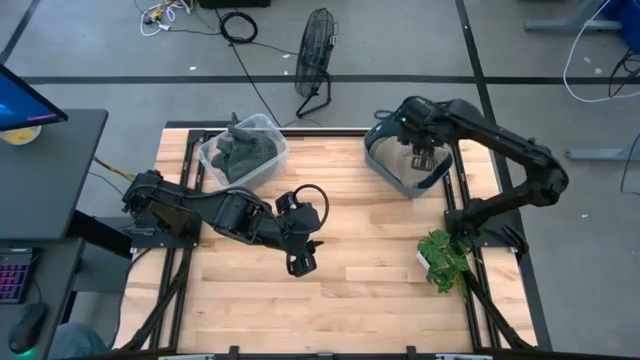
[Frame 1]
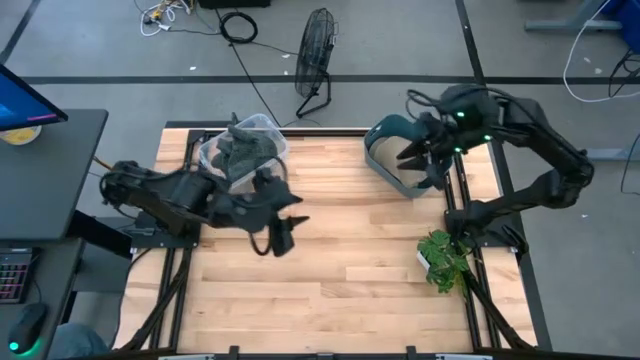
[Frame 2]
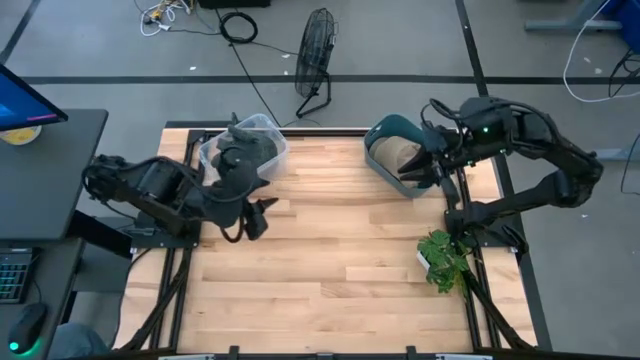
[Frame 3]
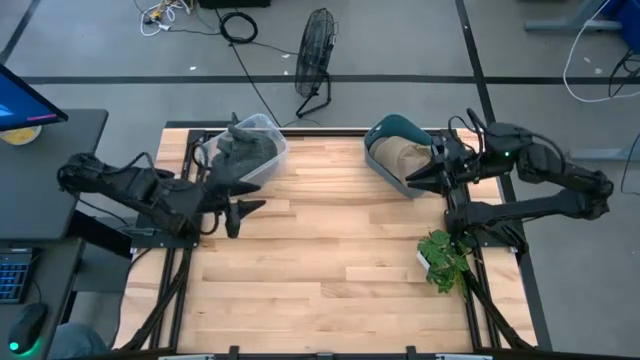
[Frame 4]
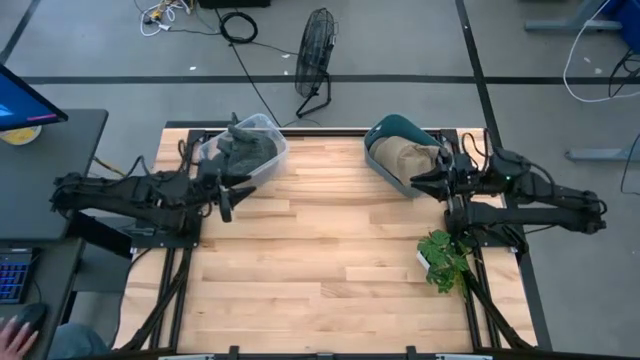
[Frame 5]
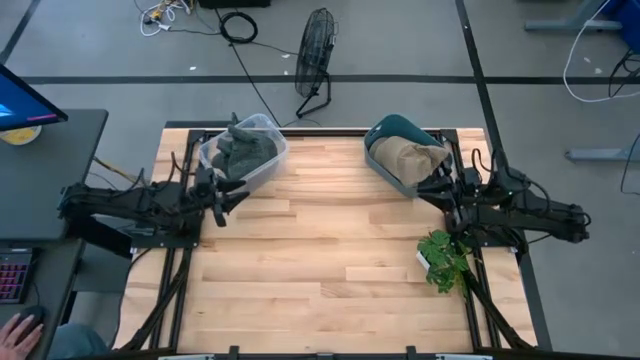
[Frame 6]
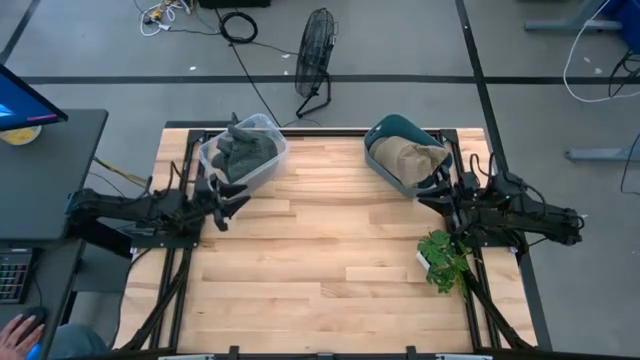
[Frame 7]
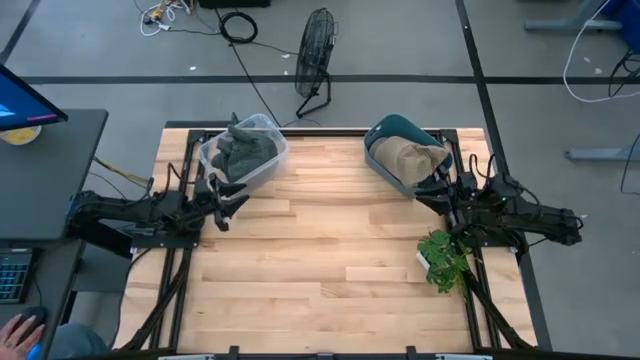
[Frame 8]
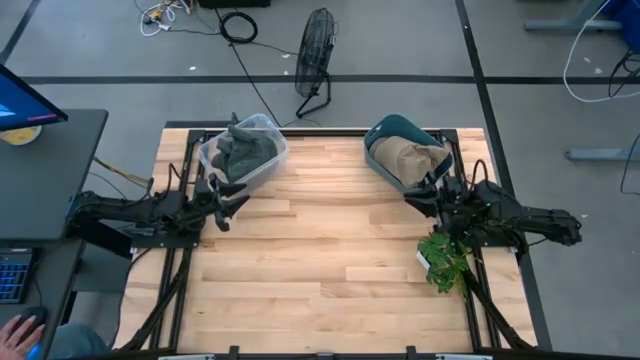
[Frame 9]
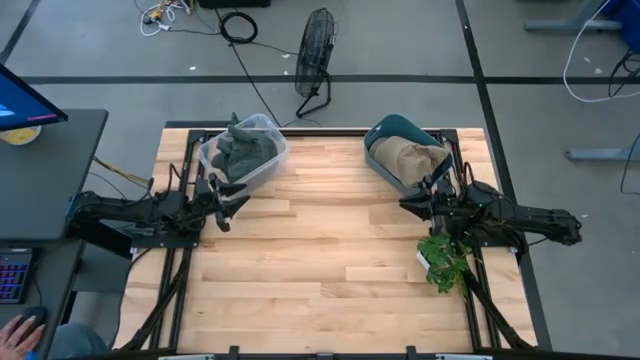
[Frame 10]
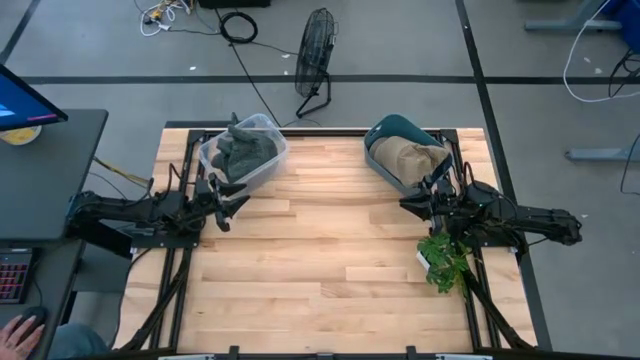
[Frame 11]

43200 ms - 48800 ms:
Task: Pick & Place hat
Return to Home Position

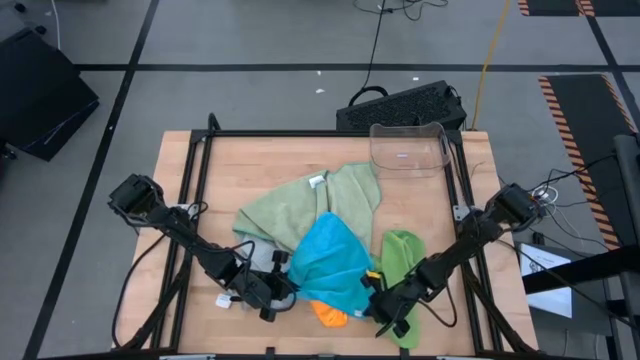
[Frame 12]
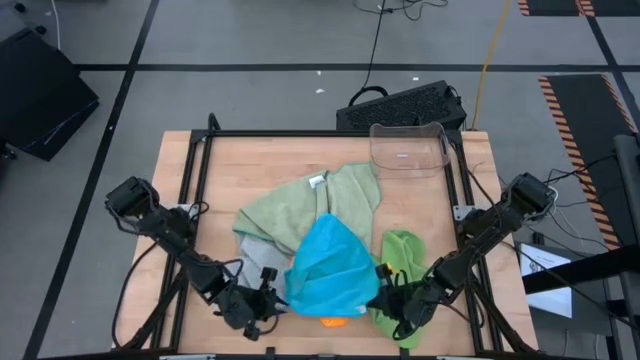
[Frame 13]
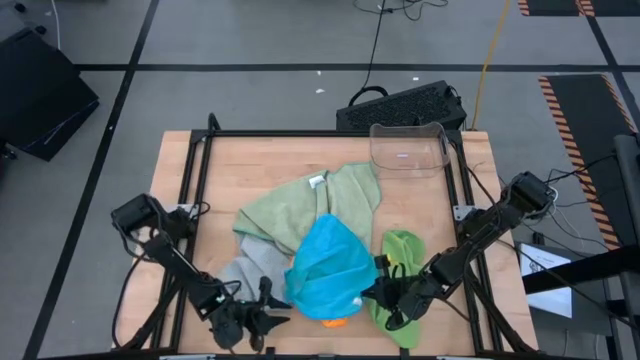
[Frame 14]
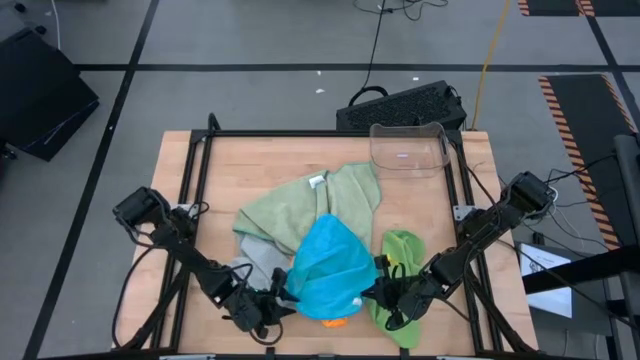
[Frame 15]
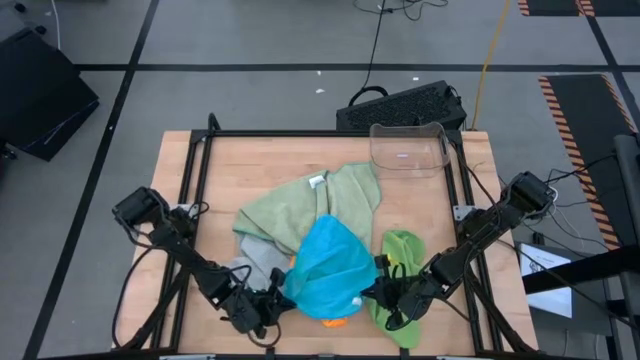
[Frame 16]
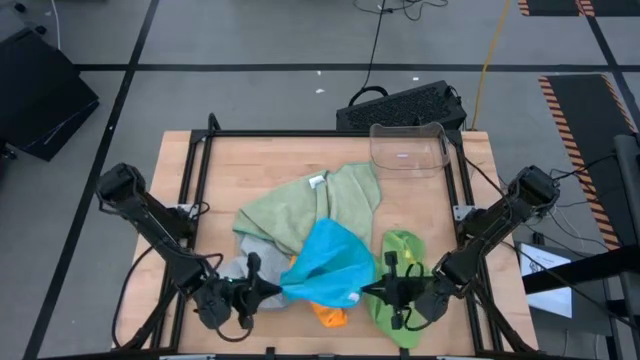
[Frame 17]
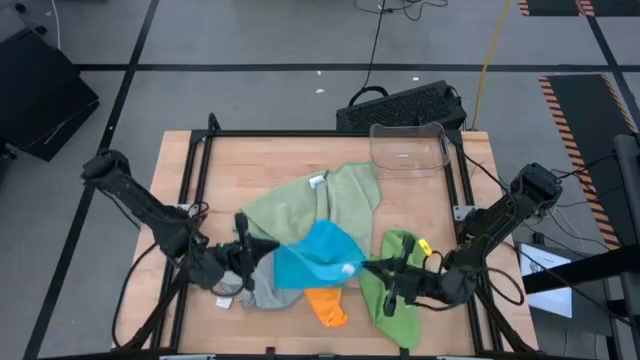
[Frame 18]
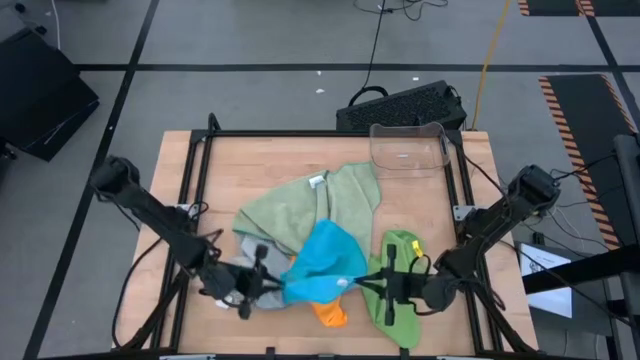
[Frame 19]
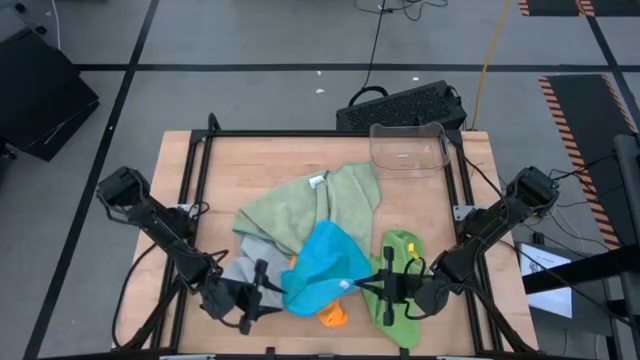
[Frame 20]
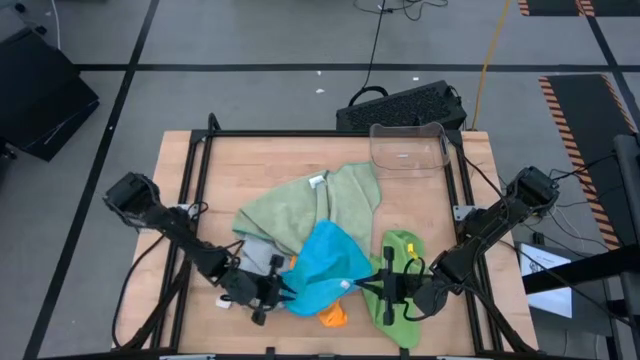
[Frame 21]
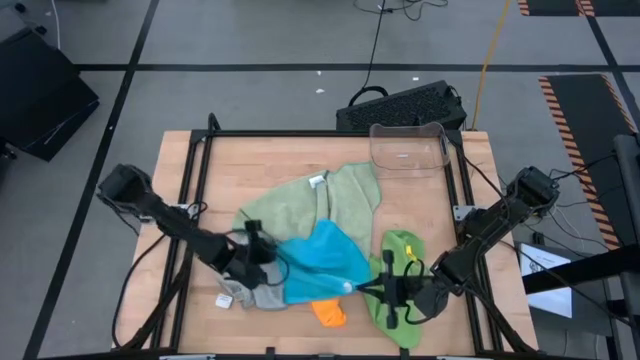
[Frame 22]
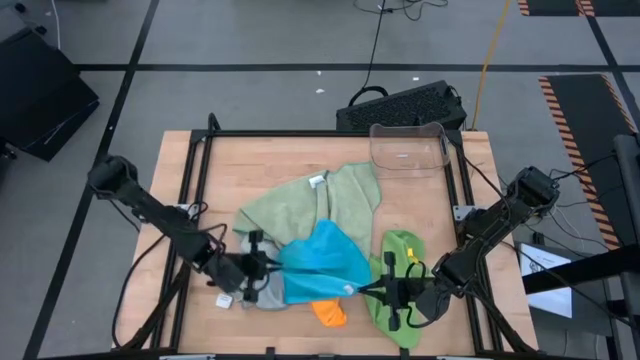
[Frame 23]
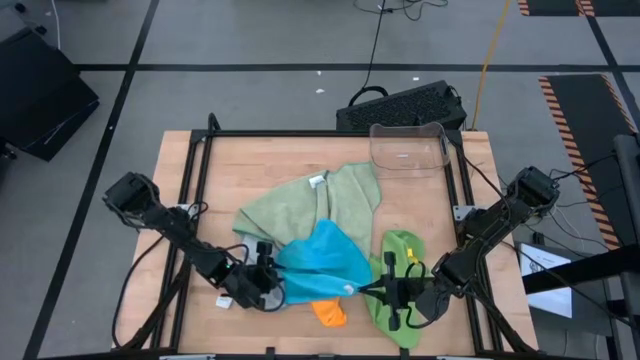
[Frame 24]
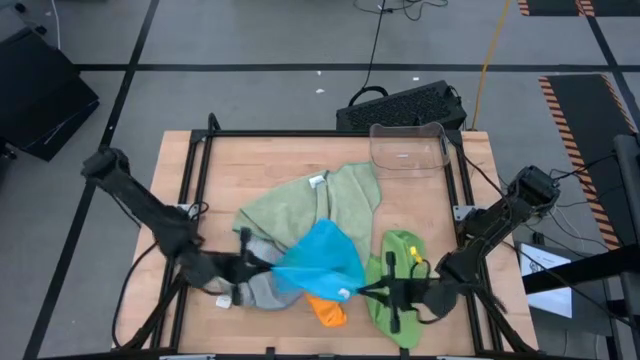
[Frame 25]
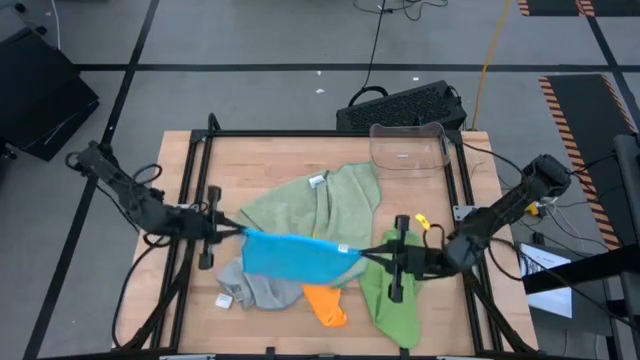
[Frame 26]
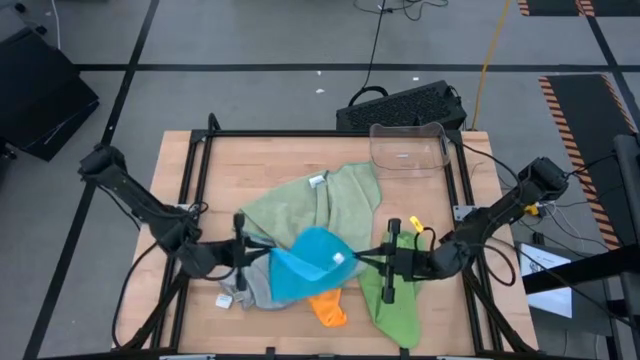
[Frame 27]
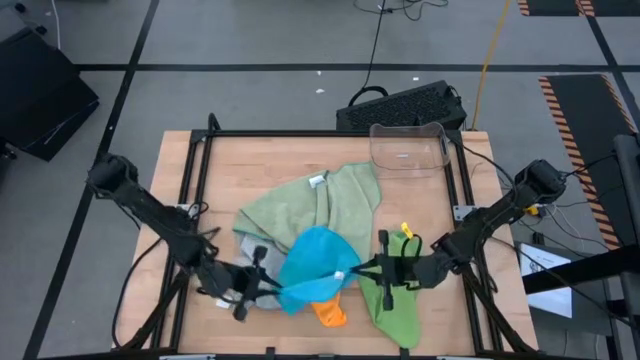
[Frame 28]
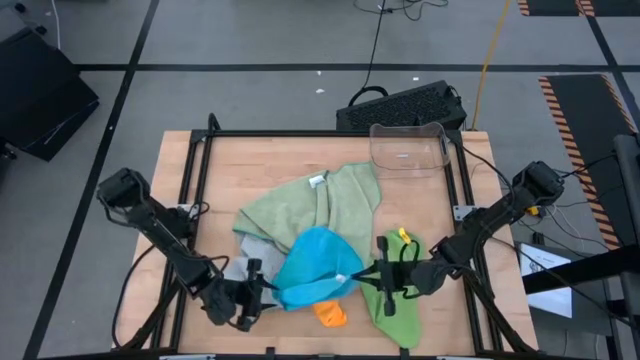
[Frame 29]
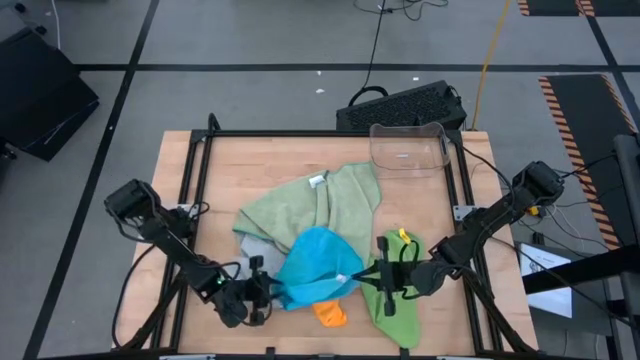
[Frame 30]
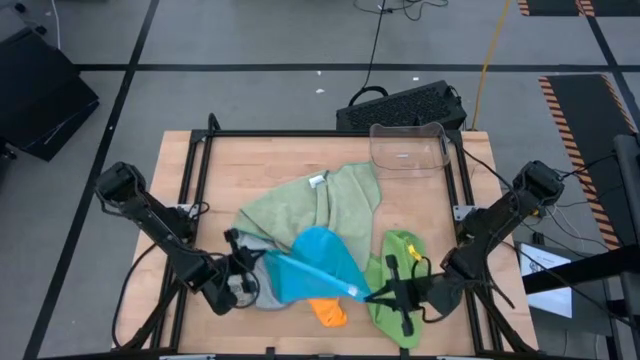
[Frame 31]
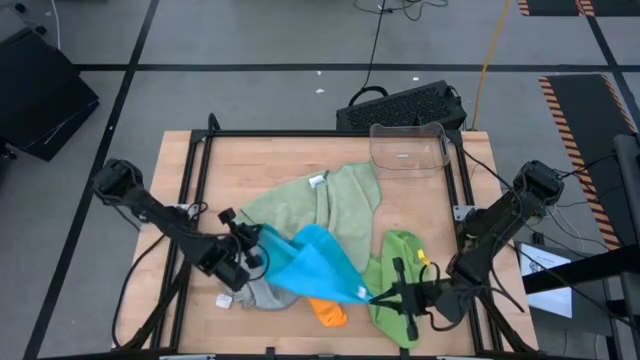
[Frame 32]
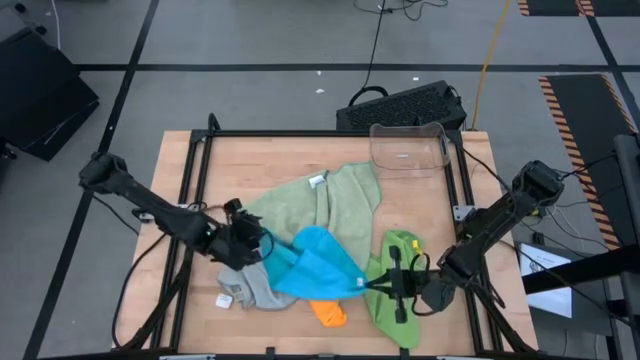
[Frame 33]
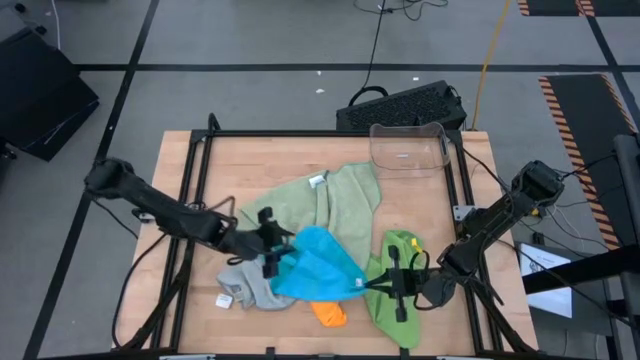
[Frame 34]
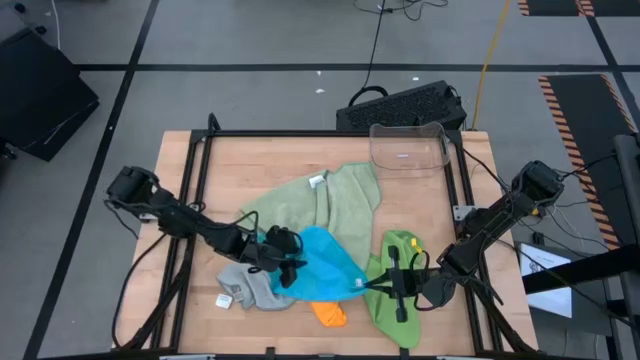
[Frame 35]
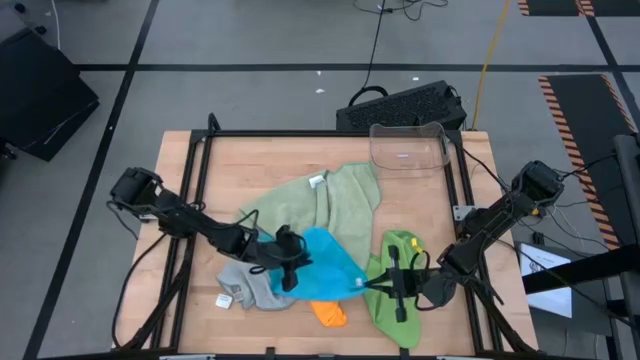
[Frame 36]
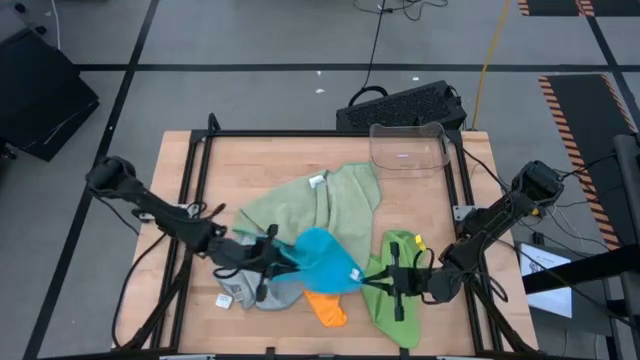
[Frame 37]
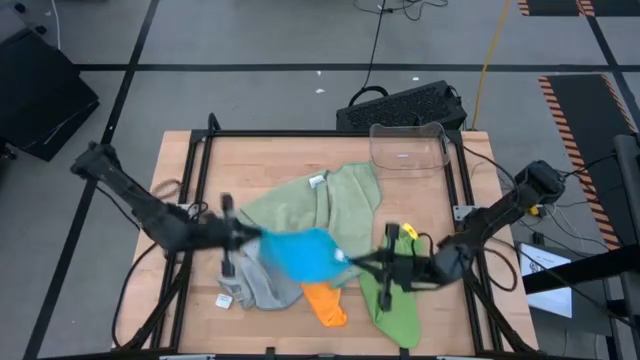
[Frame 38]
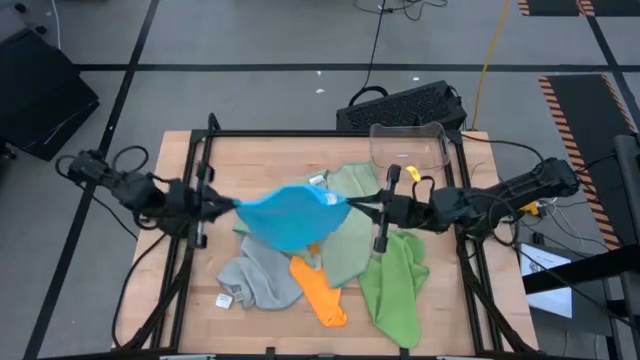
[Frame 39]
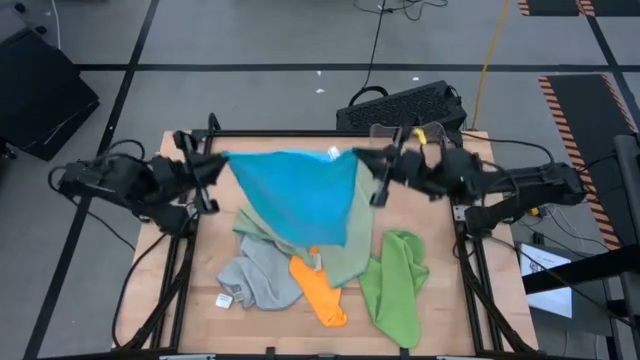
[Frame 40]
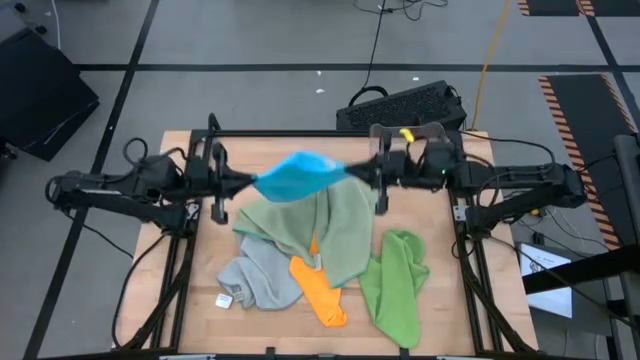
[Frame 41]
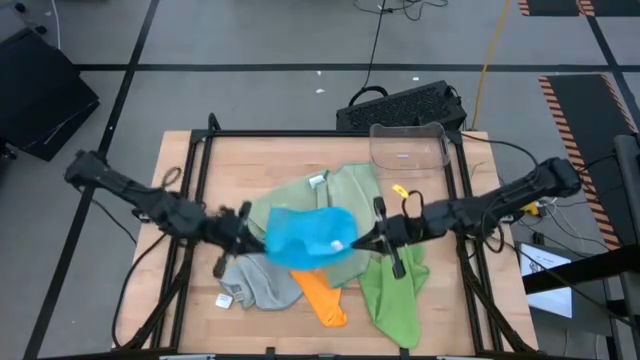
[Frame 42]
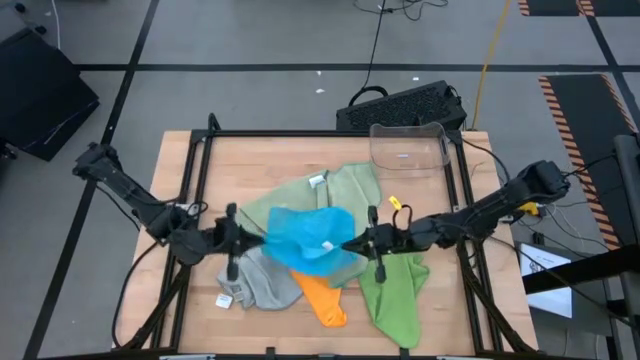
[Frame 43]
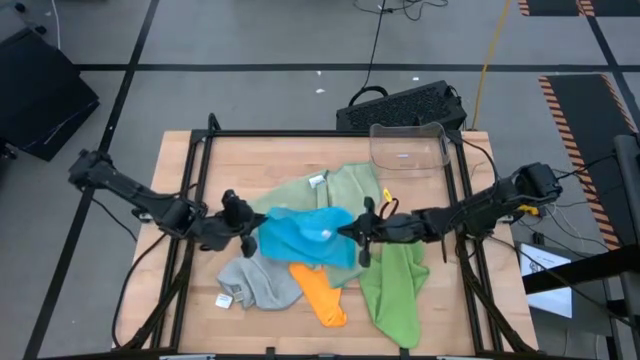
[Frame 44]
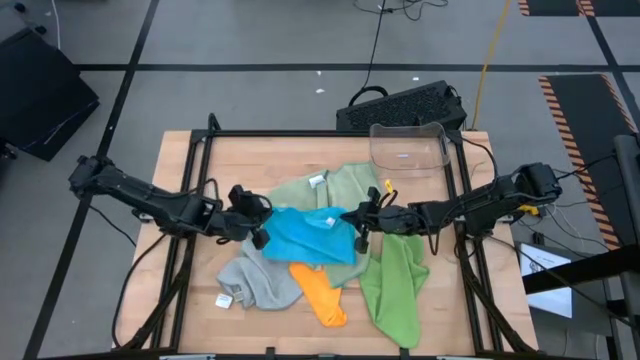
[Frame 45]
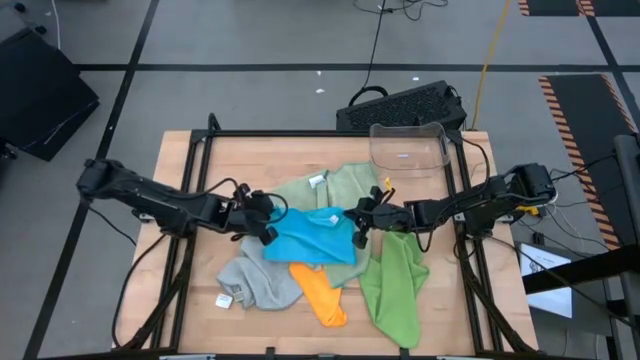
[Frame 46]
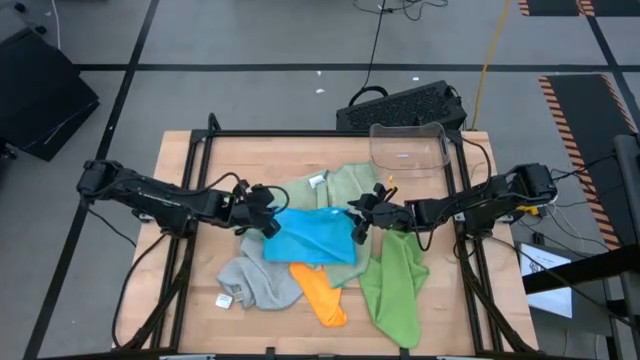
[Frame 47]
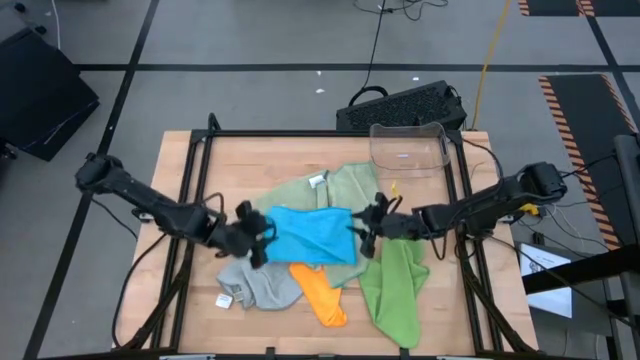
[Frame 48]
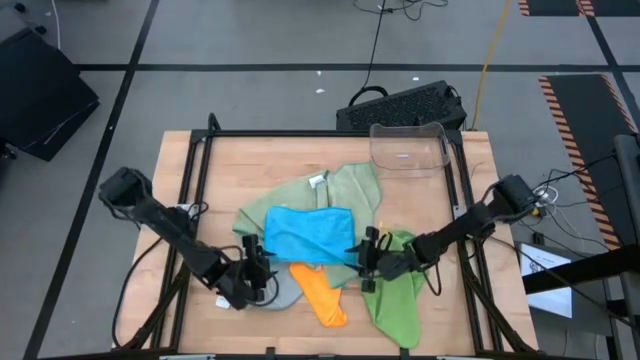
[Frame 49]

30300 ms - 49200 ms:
Task: Fold microfiber towels
Fold the blue microfiber towel
